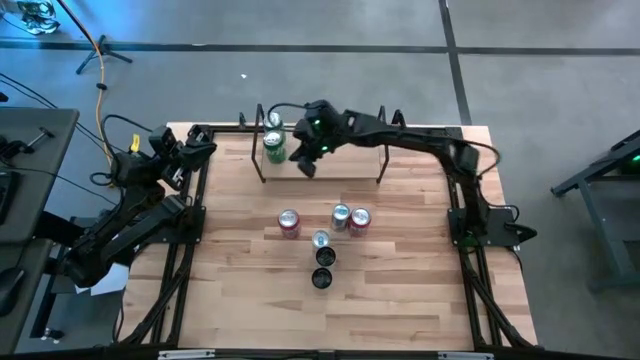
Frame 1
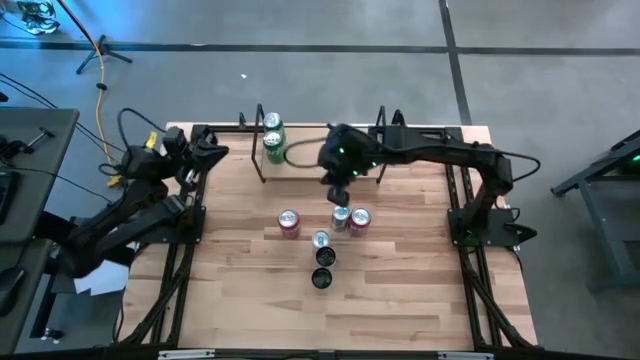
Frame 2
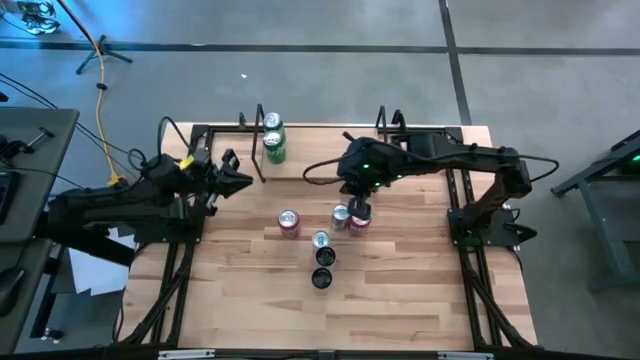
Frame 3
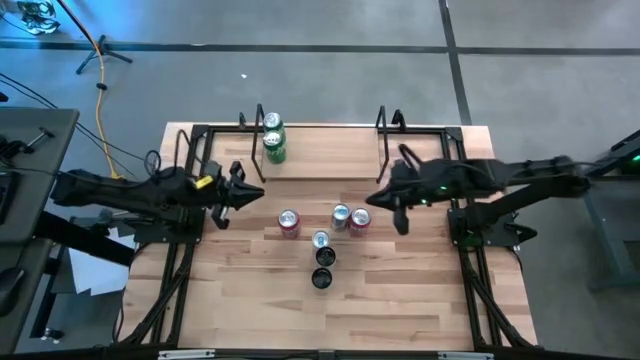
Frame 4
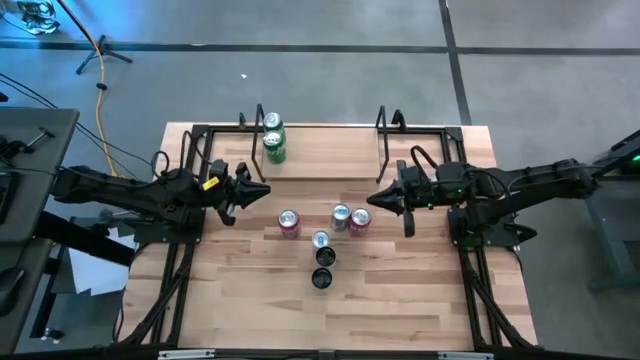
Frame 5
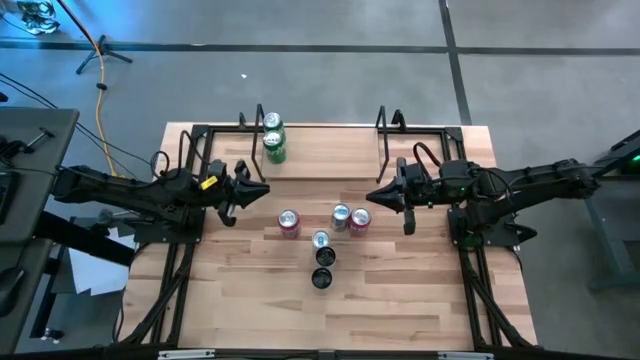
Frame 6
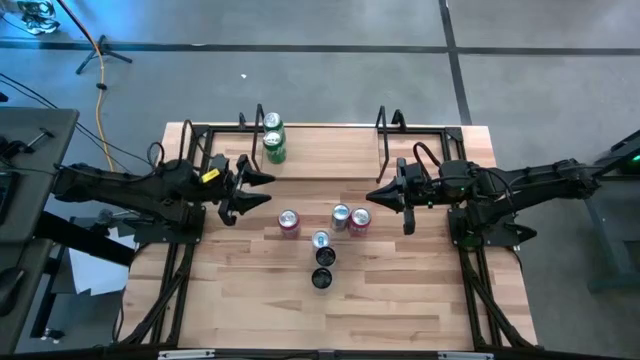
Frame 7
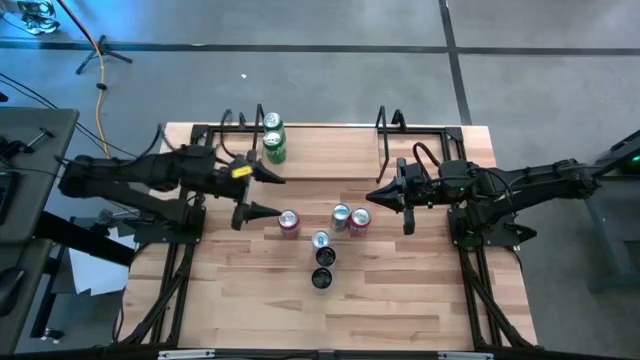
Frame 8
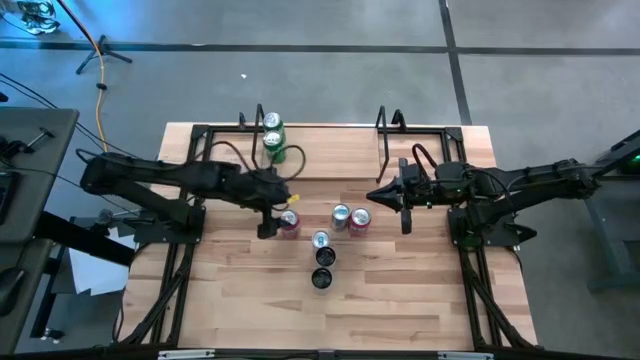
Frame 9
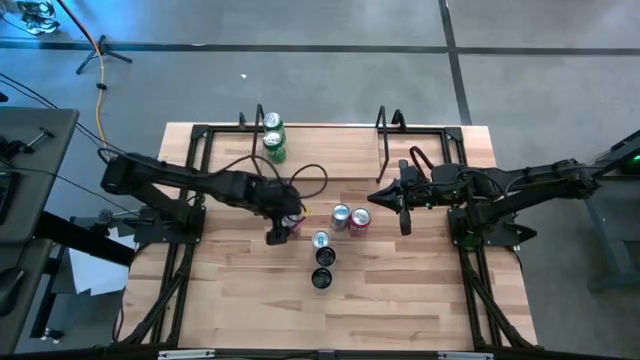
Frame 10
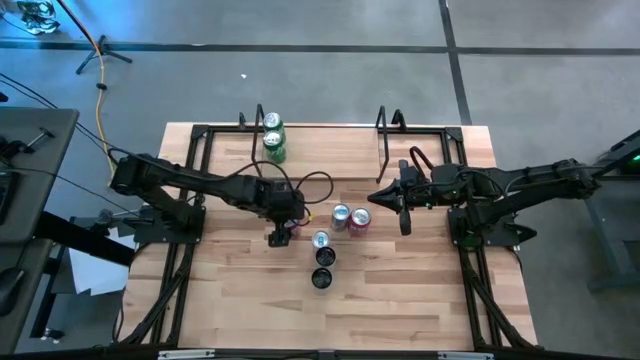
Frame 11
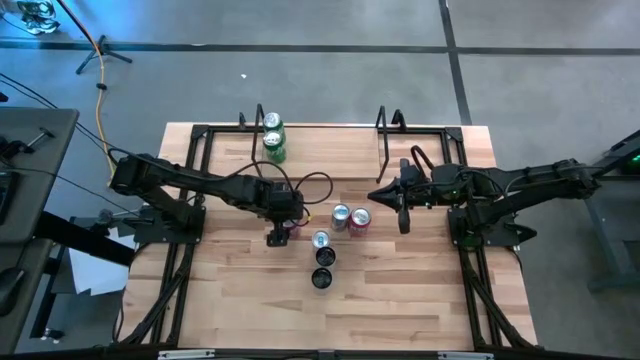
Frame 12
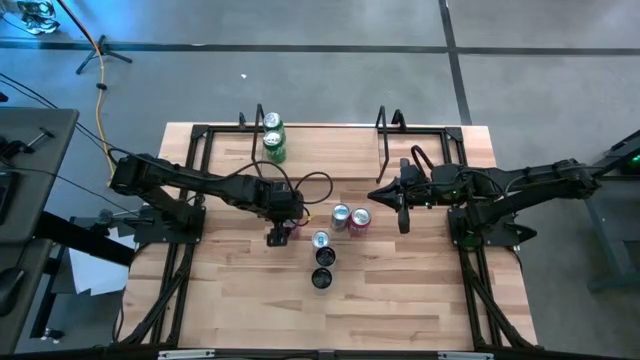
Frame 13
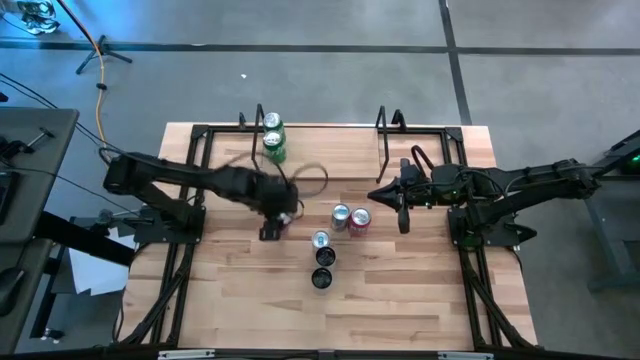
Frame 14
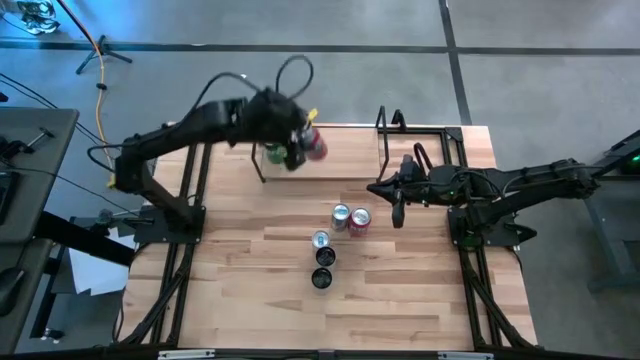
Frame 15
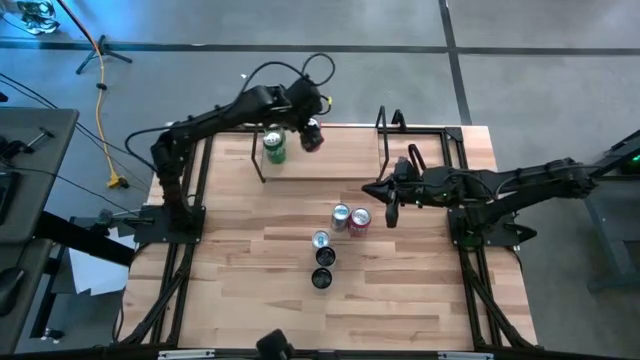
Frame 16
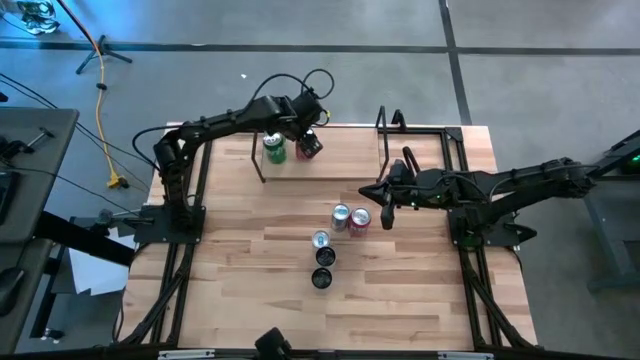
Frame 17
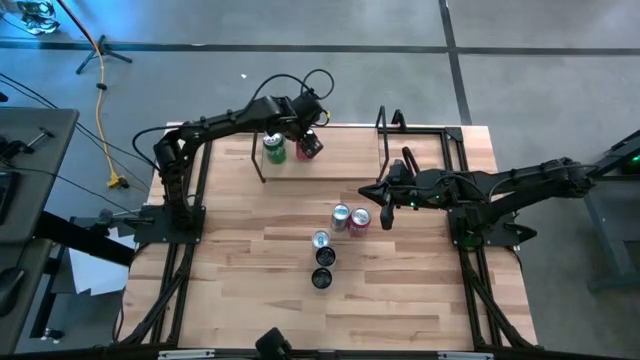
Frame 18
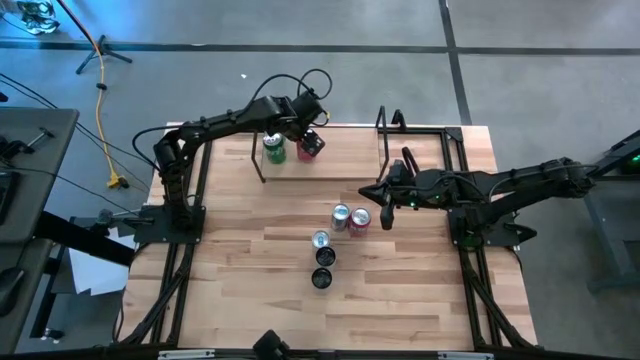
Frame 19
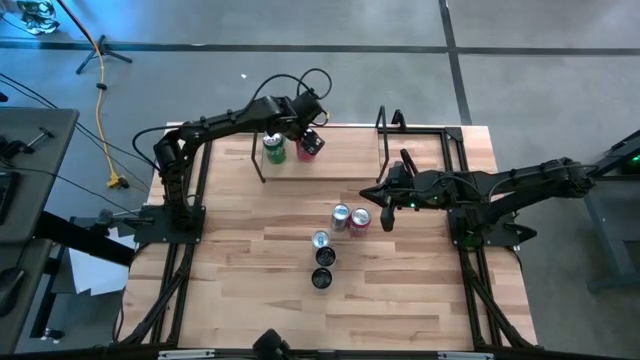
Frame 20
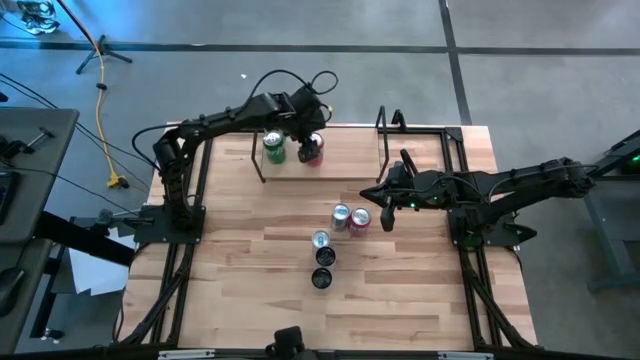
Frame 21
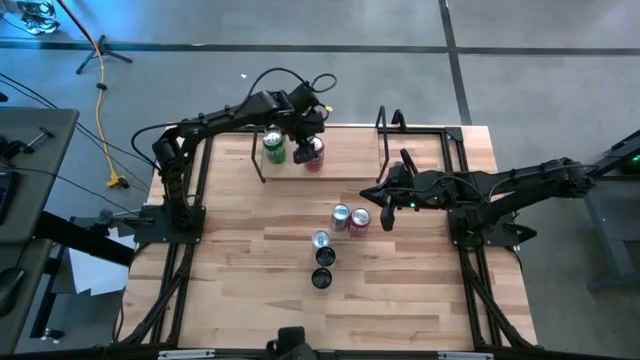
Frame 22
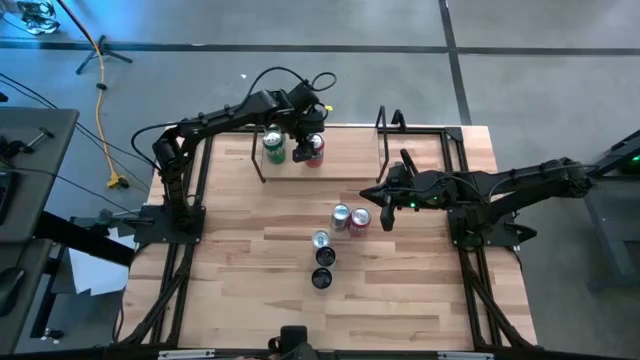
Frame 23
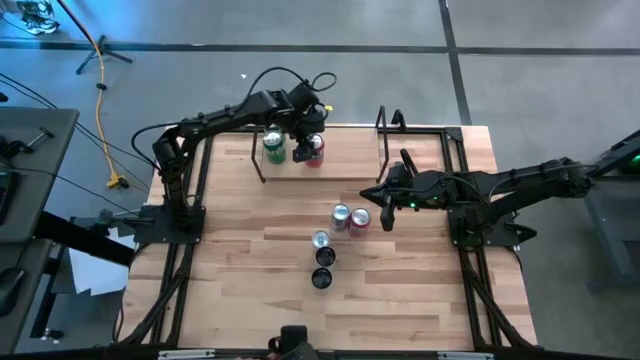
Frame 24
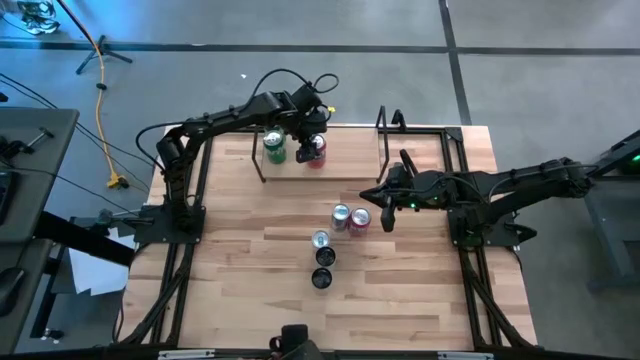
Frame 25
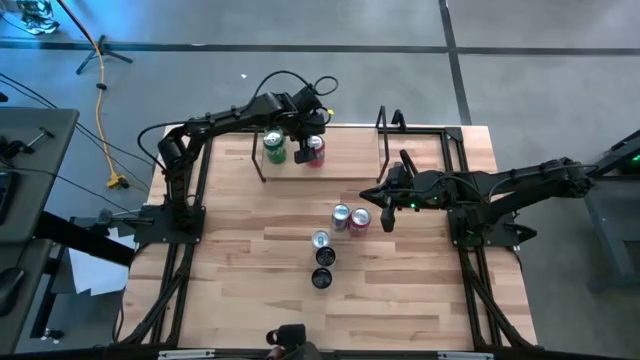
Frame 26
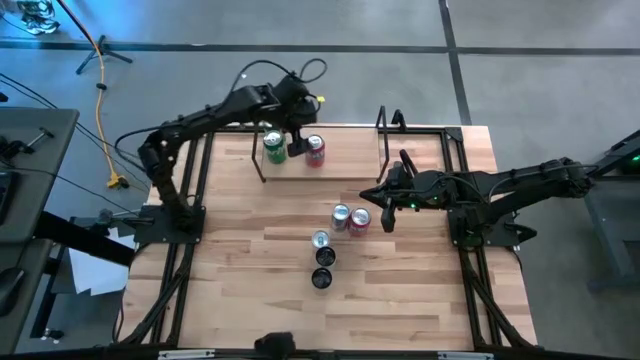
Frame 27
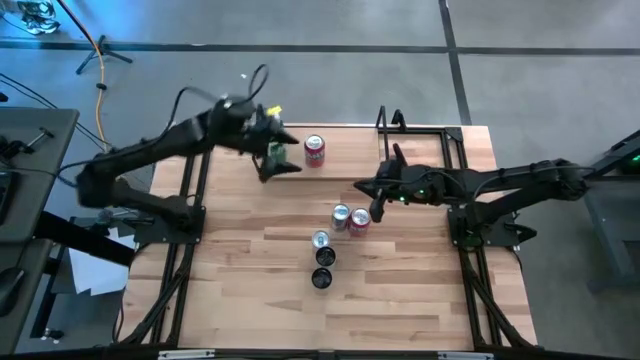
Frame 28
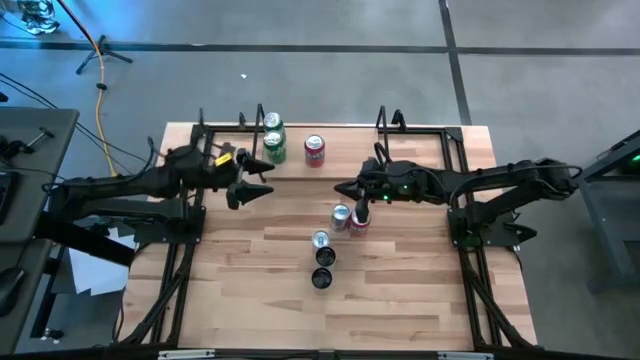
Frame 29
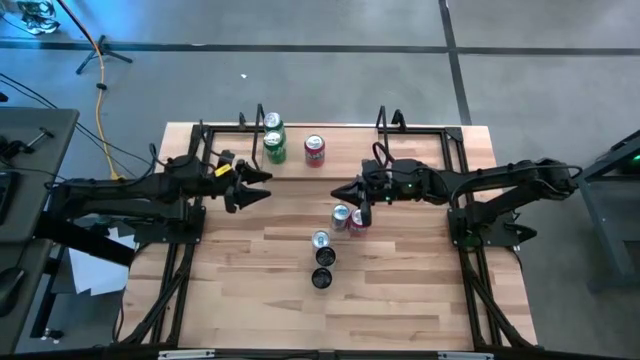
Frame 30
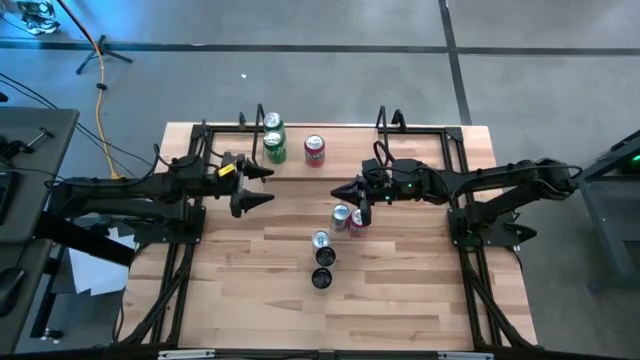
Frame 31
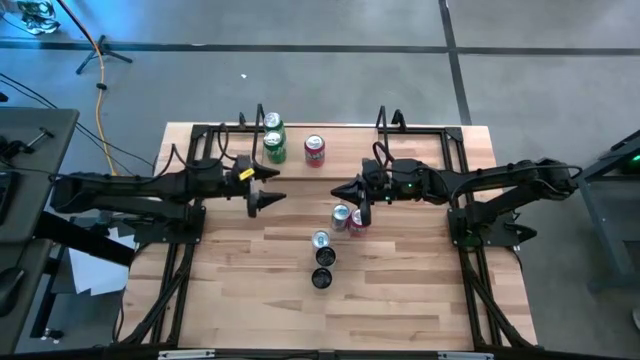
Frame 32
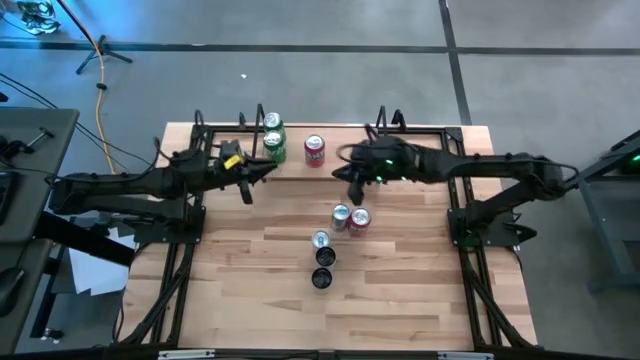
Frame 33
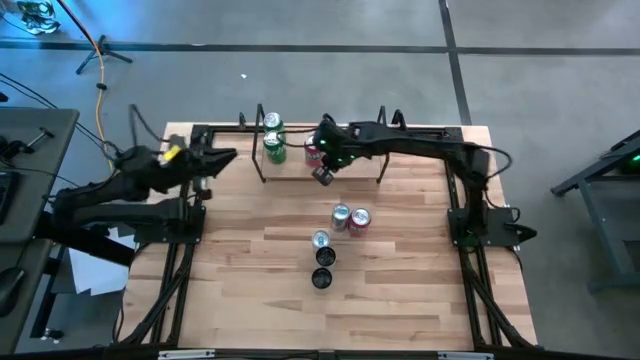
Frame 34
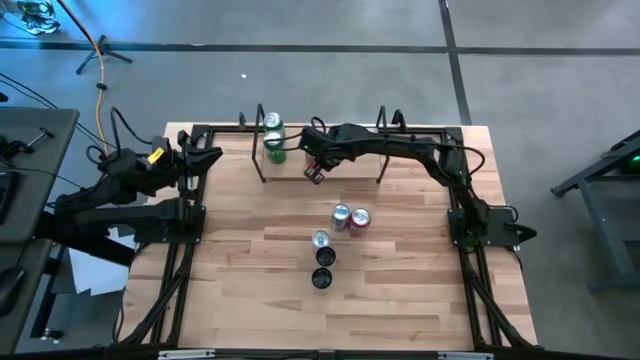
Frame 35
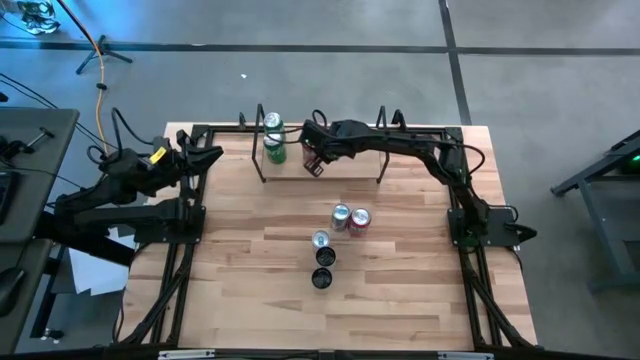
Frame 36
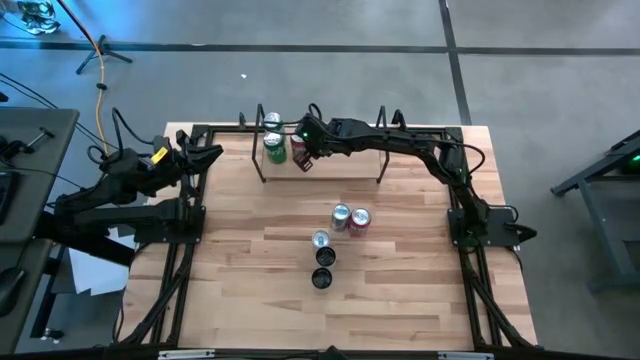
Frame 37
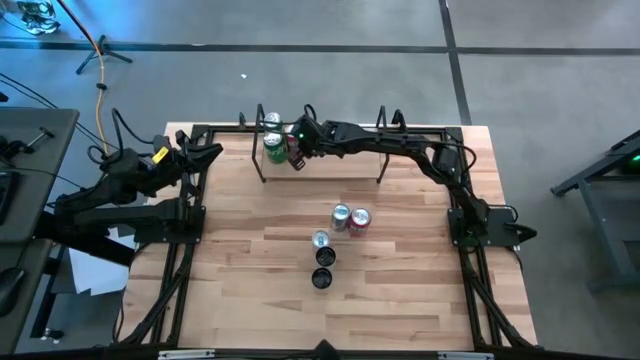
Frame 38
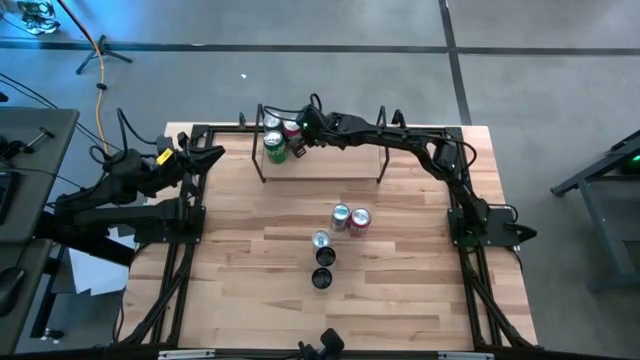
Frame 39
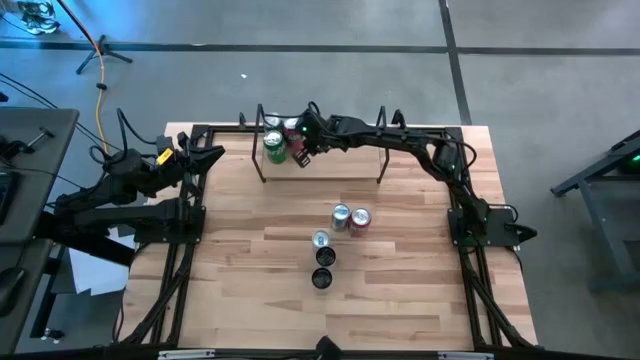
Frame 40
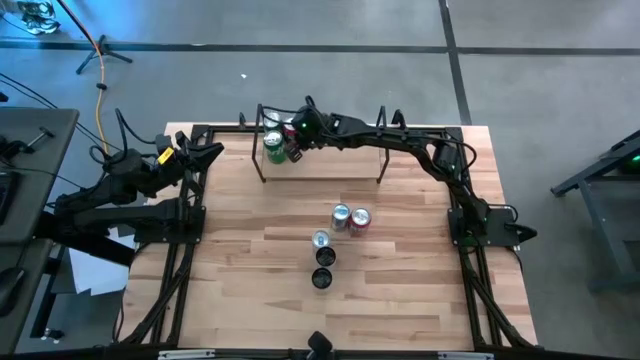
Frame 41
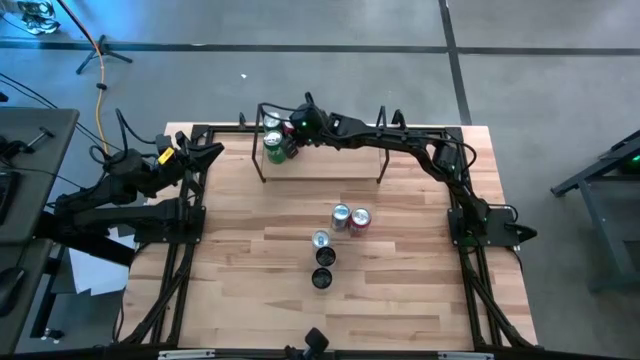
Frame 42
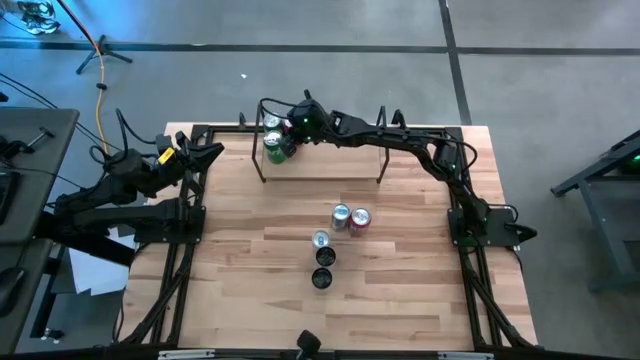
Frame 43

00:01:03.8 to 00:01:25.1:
Task: Place canned beverage on shelf
Put the left red soda can on the shelf
